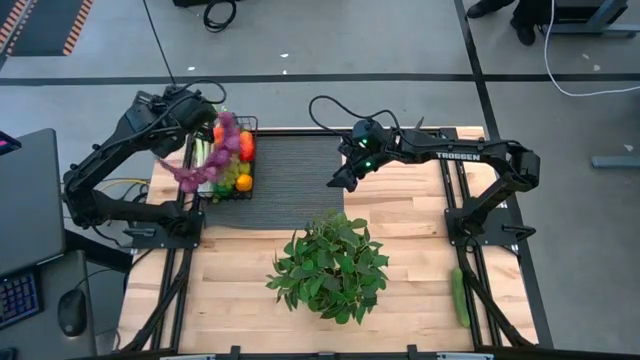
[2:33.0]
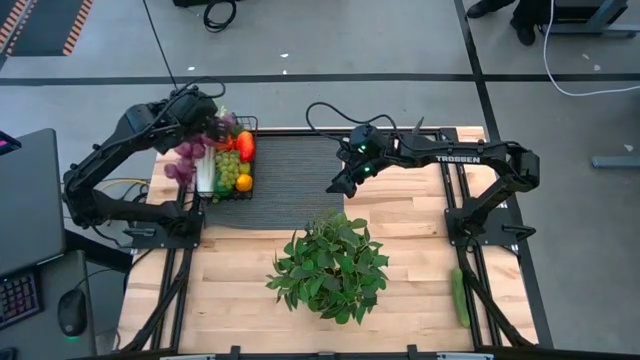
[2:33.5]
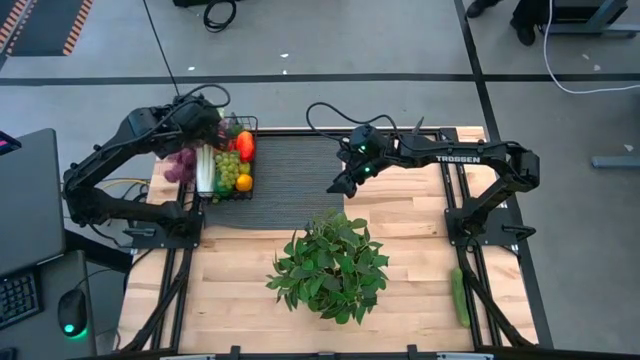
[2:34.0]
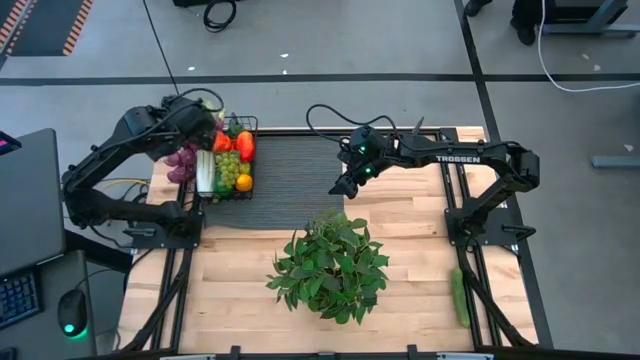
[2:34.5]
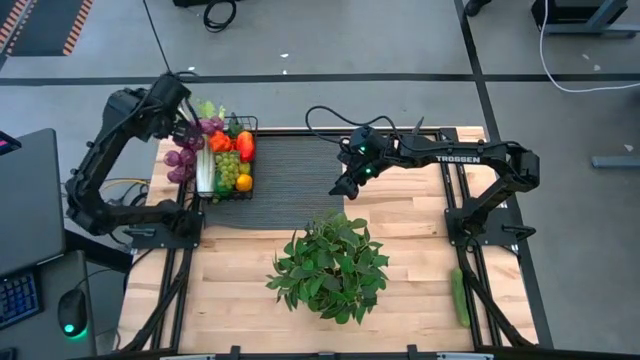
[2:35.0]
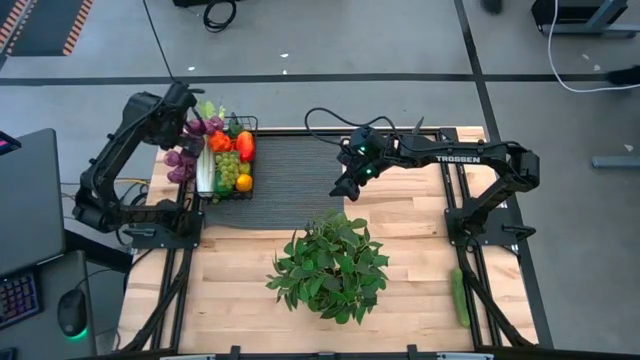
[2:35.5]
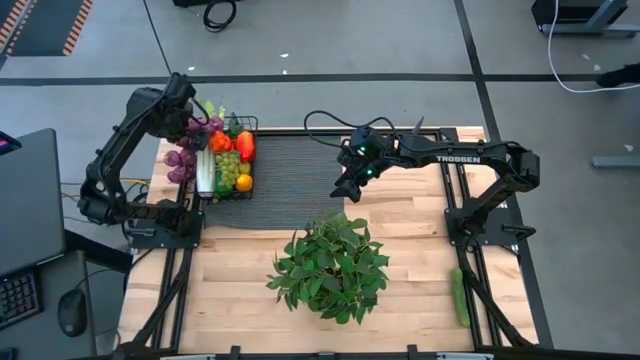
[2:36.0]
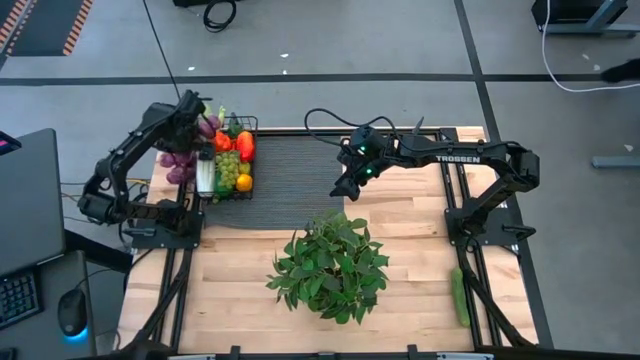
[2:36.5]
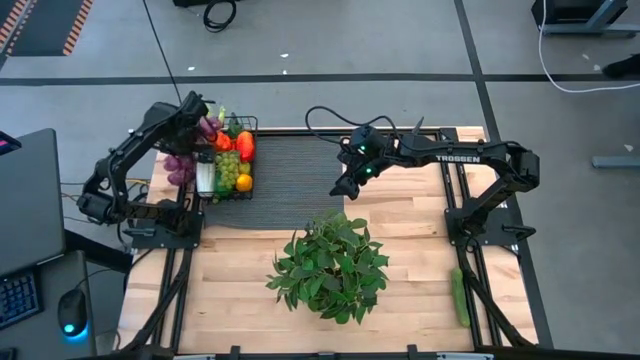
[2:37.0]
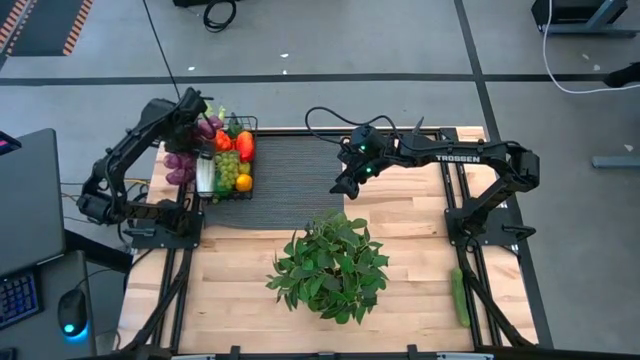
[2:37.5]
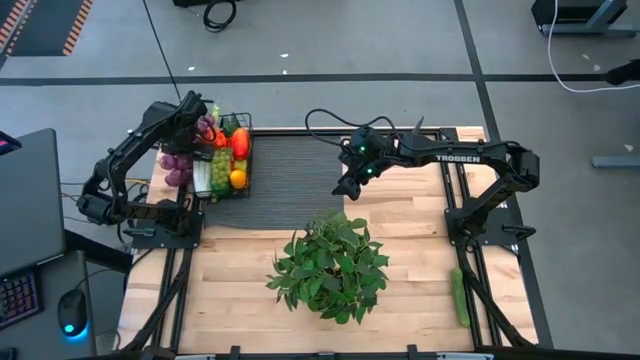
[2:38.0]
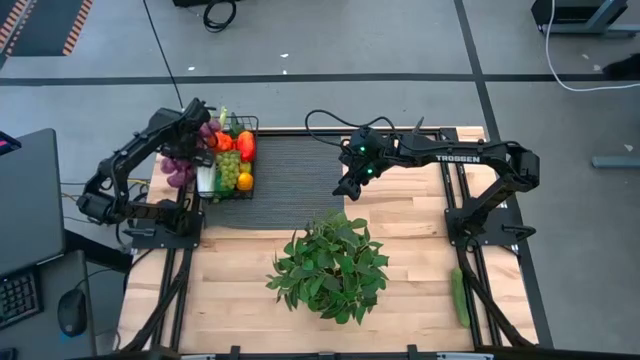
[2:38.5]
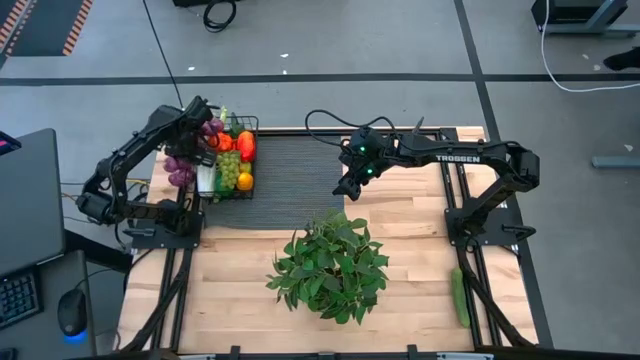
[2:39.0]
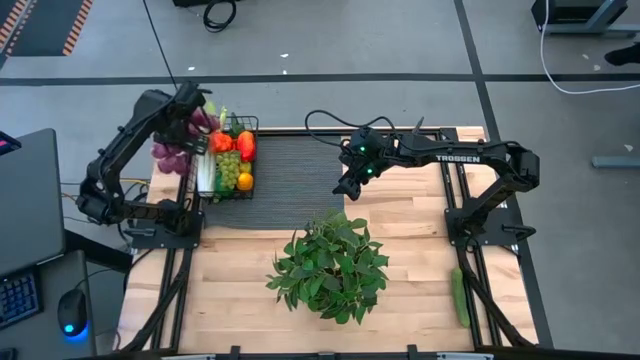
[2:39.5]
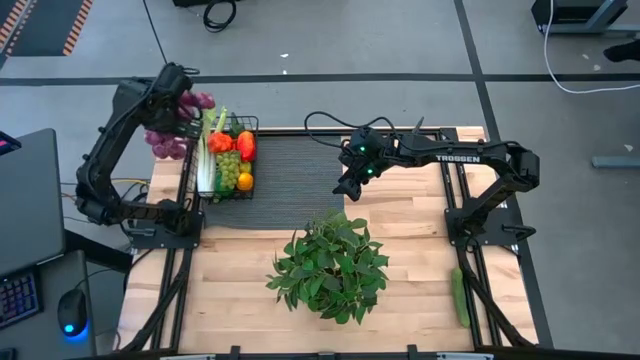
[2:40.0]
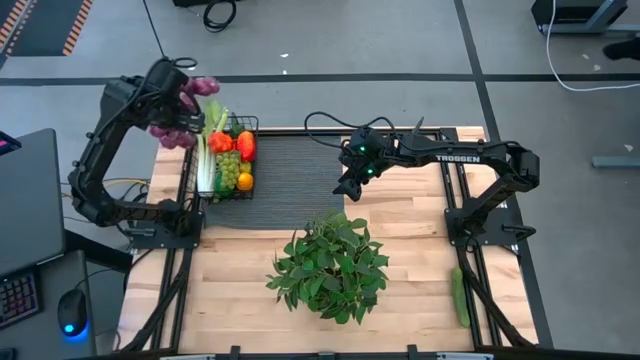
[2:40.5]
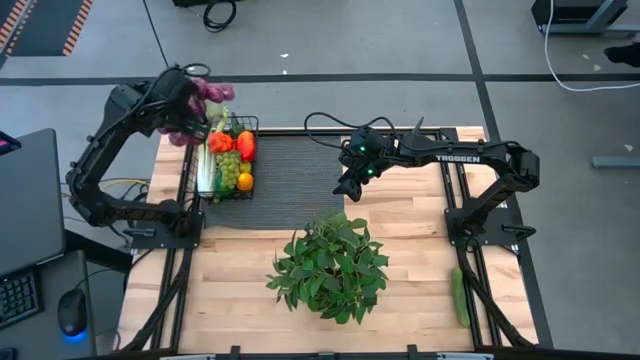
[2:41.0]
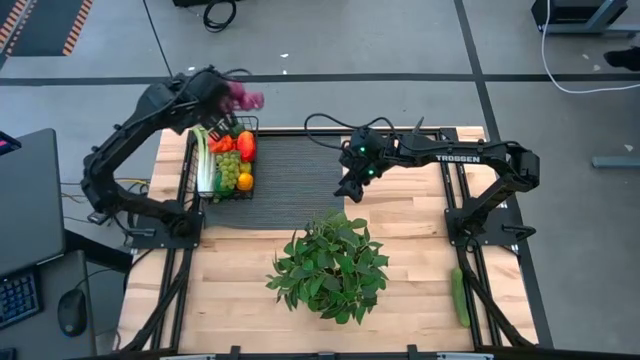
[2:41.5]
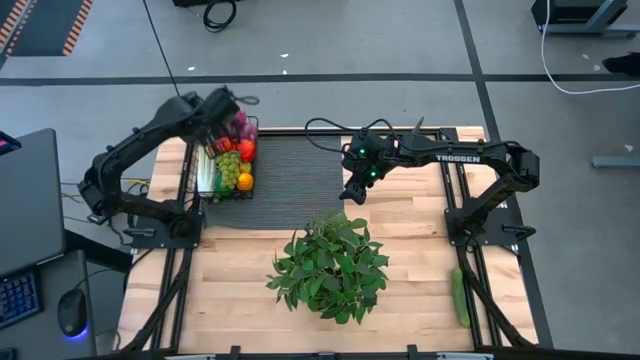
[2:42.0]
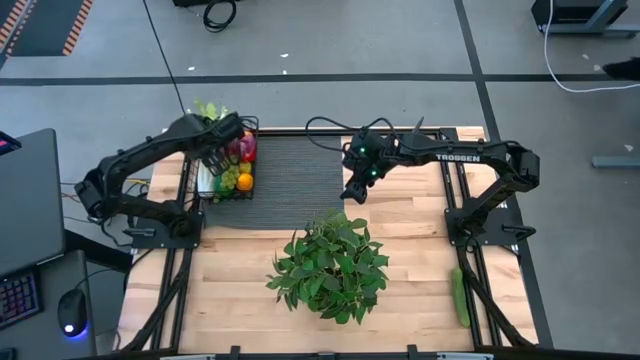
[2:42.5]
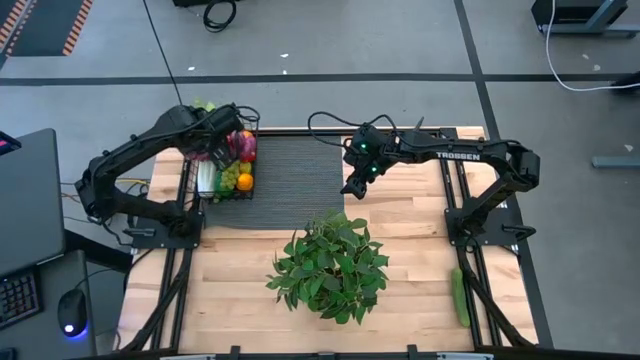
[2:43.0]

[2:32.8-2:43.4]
Task: Build produce basket
Put the purple garlic into the wire basket

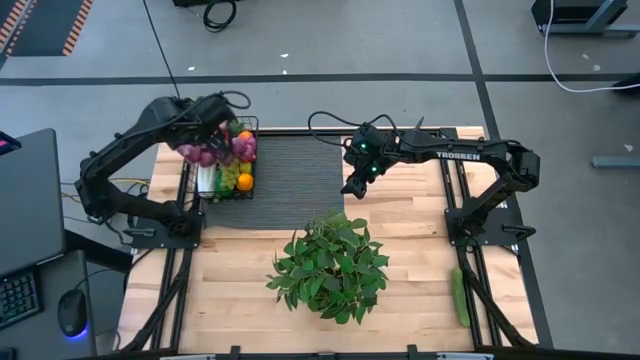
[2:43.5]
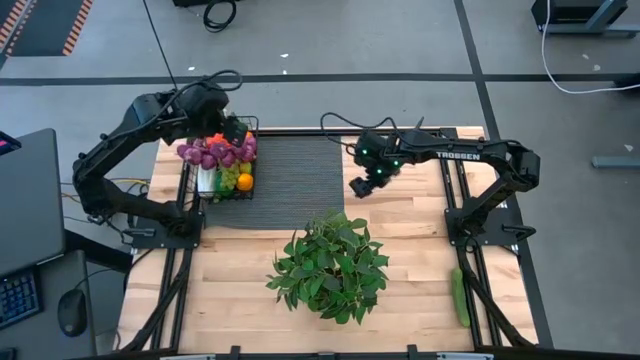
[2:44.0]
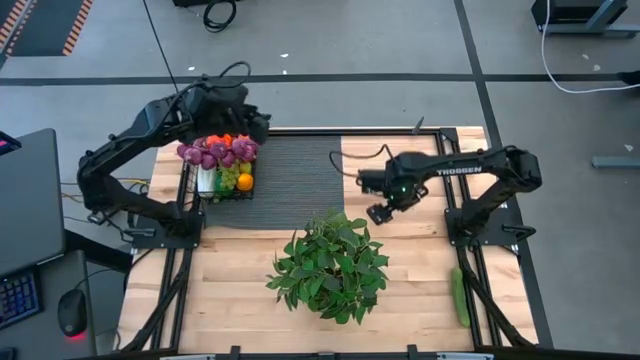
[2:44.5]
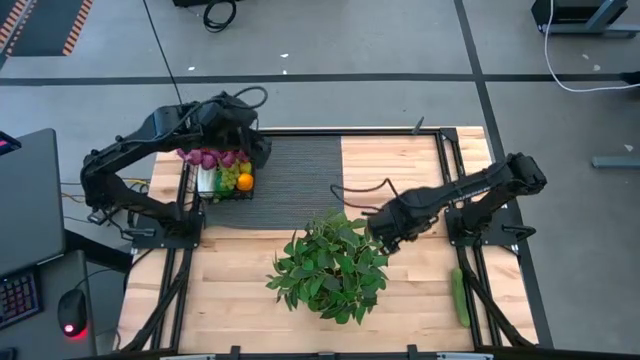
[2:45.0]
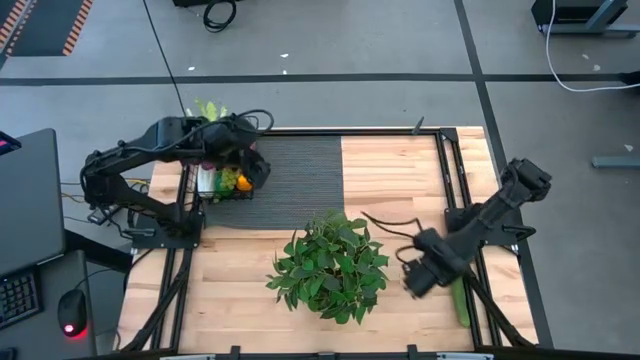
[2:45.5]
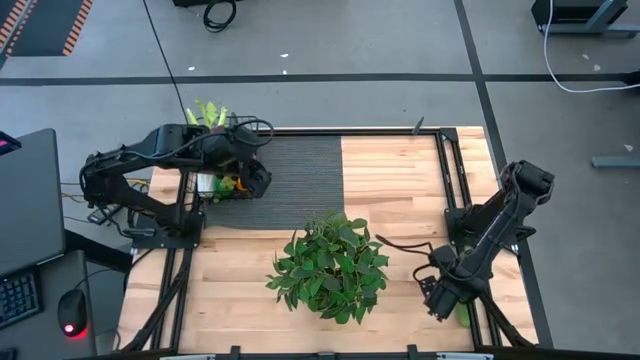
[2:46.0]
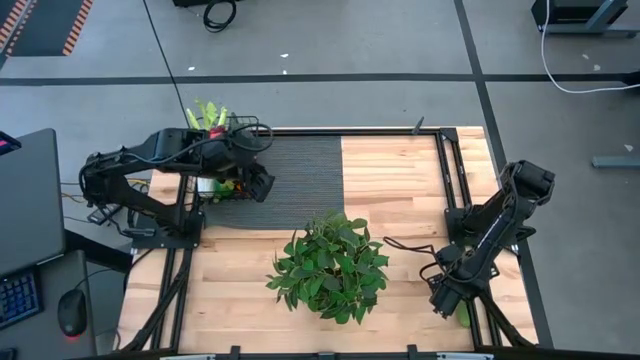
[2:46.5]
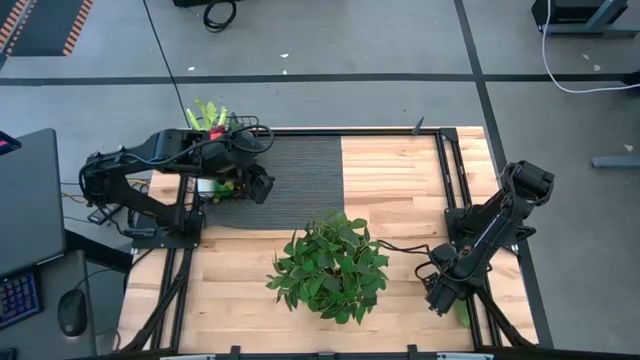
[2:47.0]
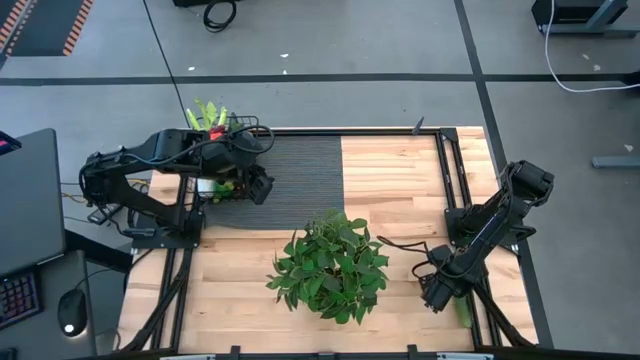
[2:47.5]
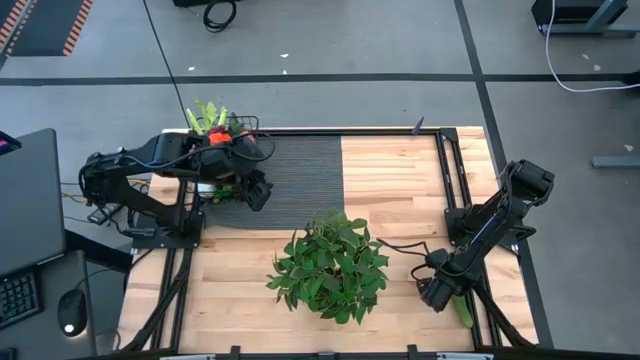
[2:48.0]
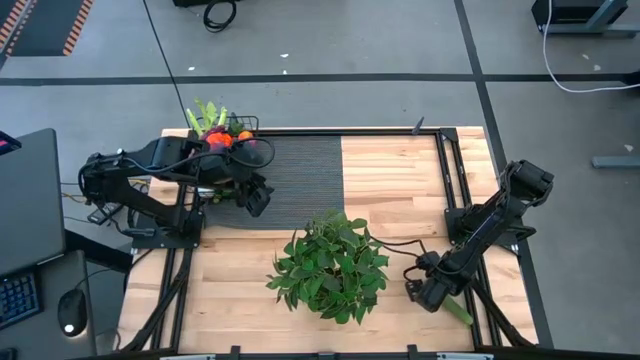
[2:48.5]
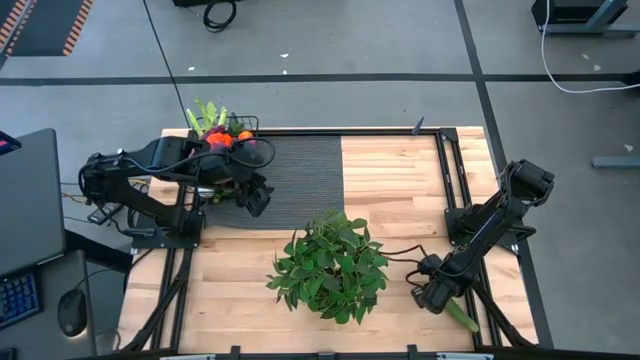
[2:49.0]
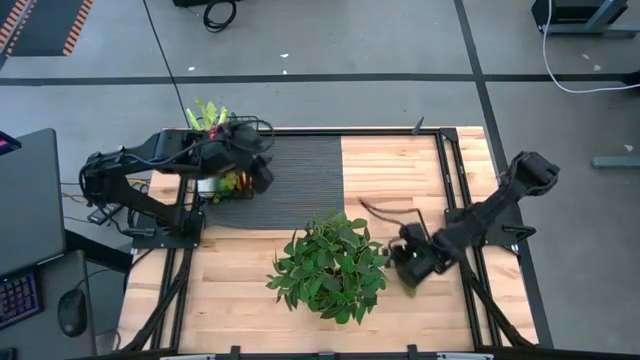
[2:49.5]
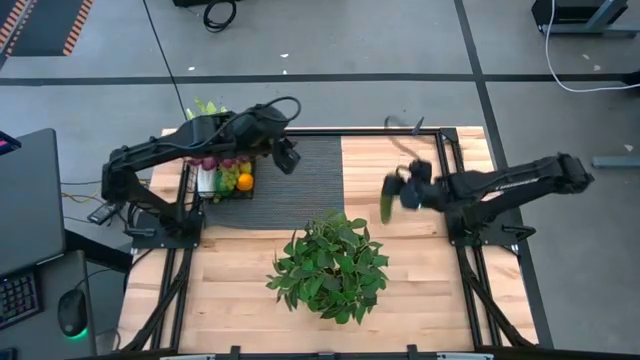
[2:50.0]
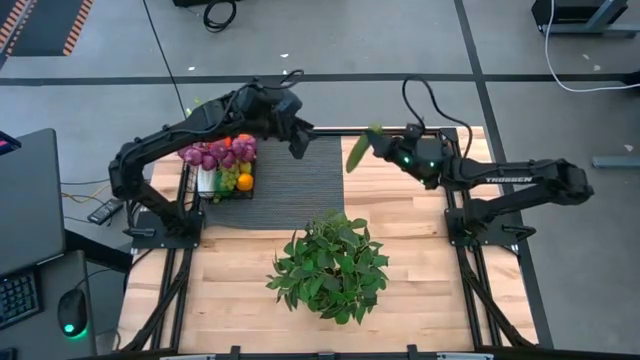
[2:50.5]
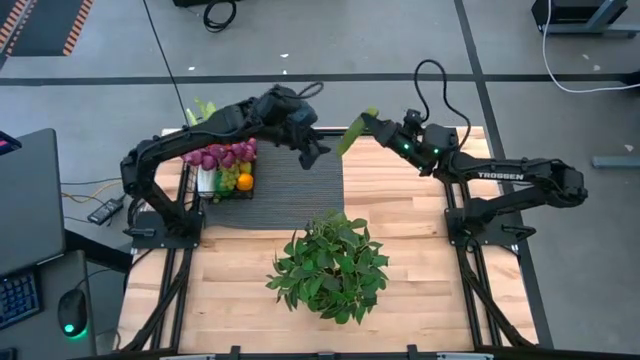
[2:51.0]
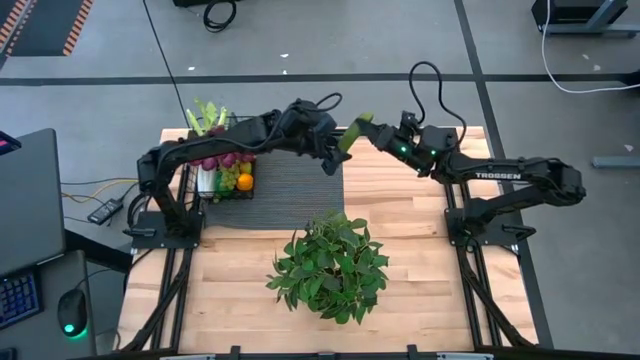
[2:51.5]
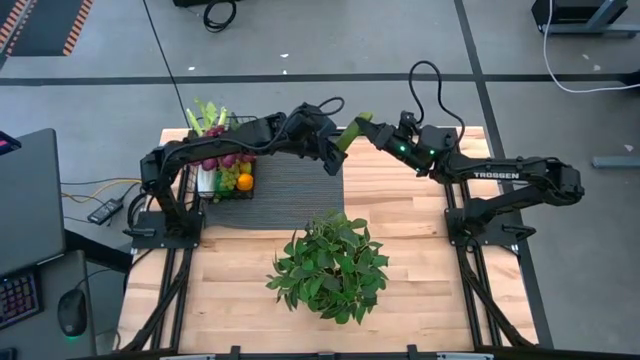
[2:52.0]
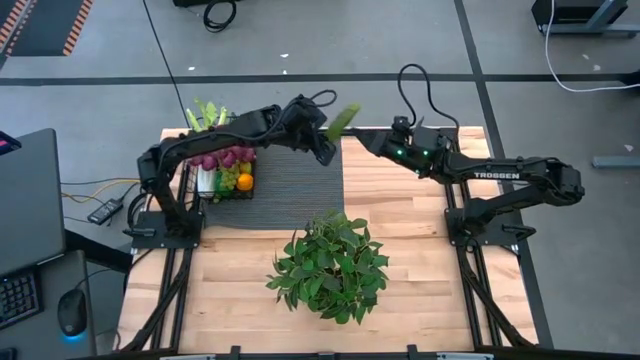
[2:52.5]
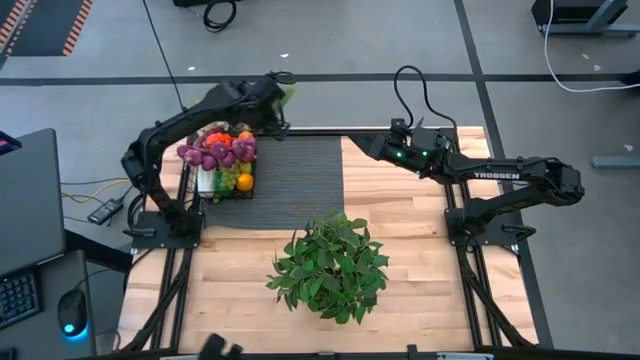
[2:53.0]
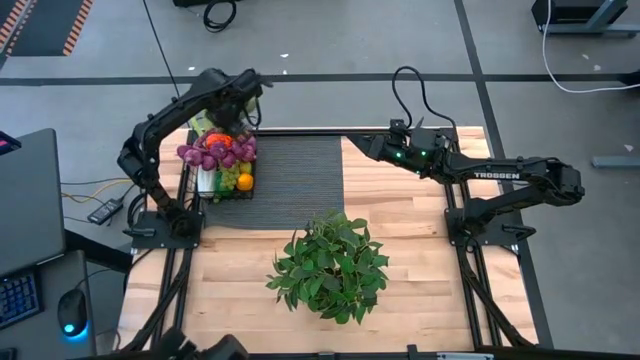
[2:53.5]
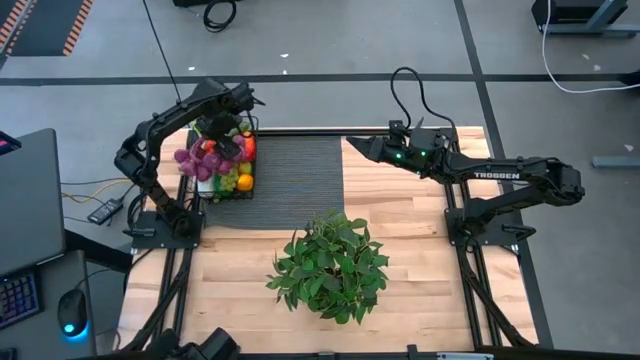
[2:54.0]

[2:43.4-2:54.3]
Put the green cucumber into the wire basket
